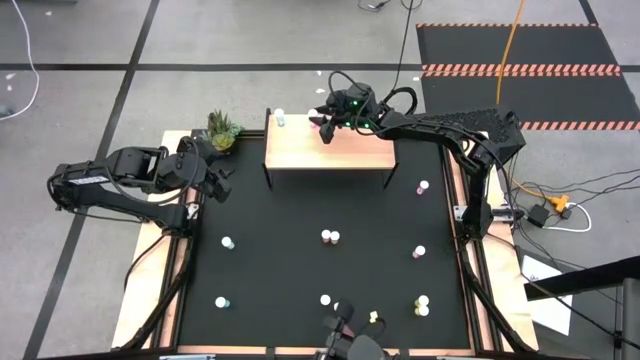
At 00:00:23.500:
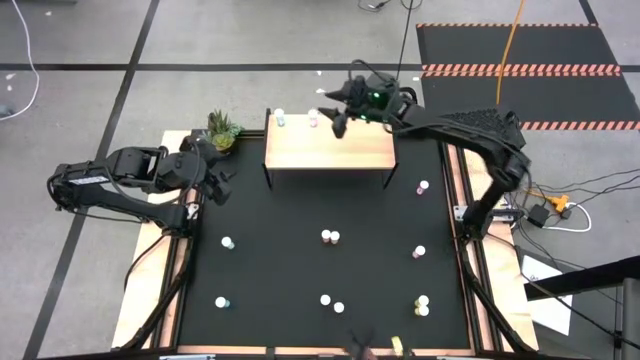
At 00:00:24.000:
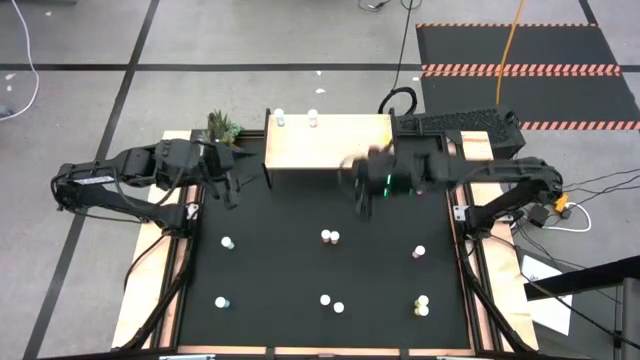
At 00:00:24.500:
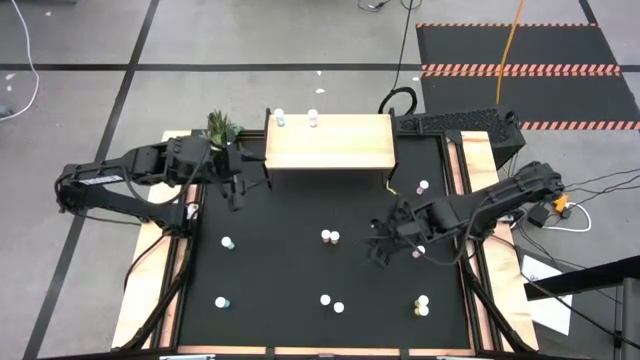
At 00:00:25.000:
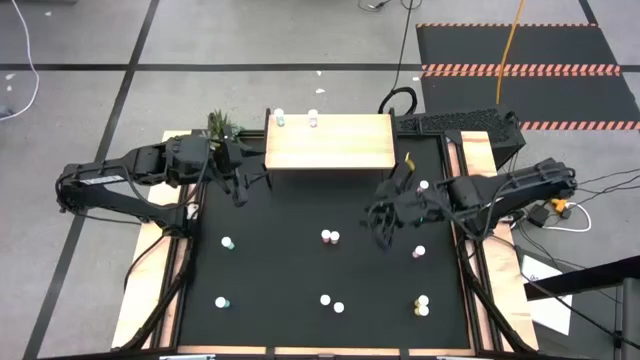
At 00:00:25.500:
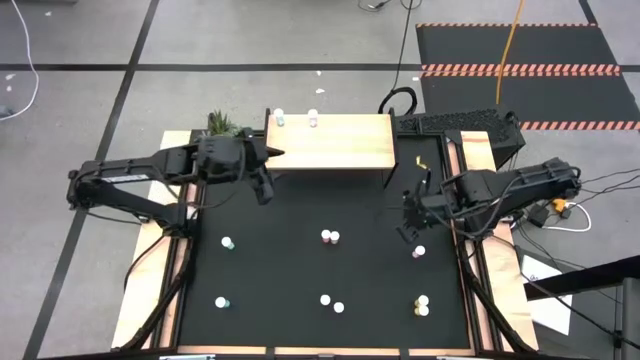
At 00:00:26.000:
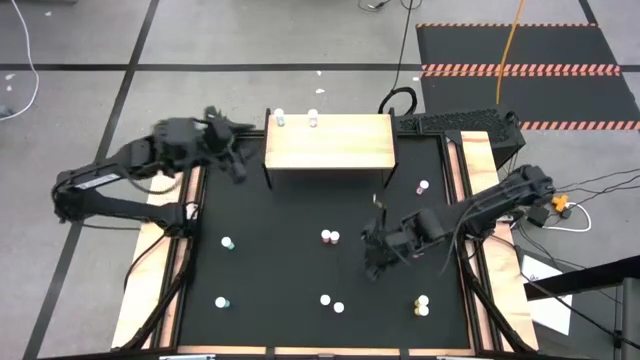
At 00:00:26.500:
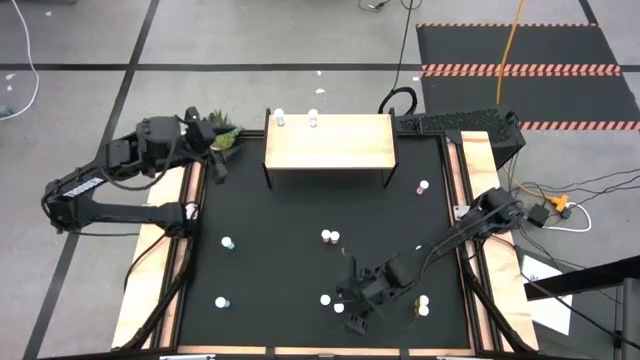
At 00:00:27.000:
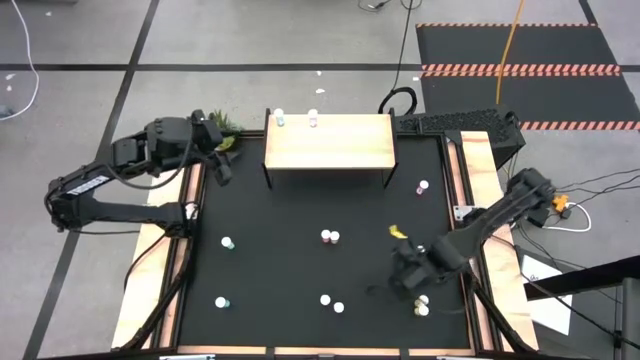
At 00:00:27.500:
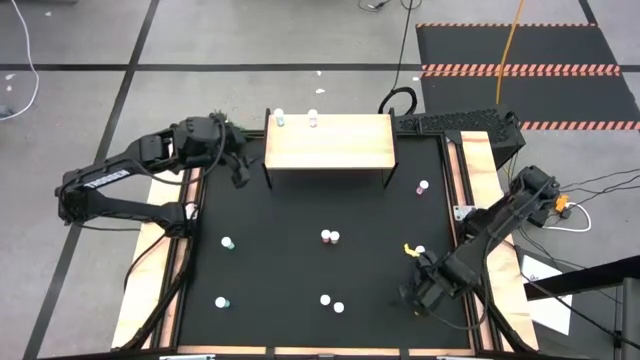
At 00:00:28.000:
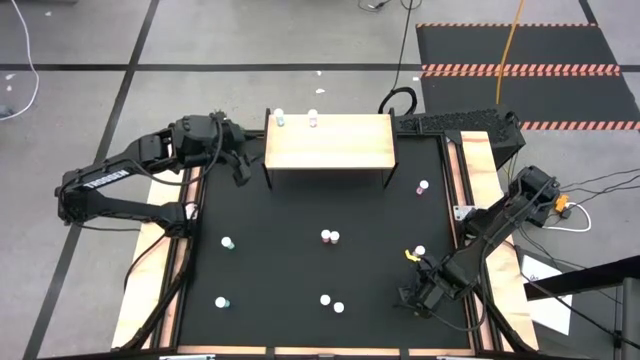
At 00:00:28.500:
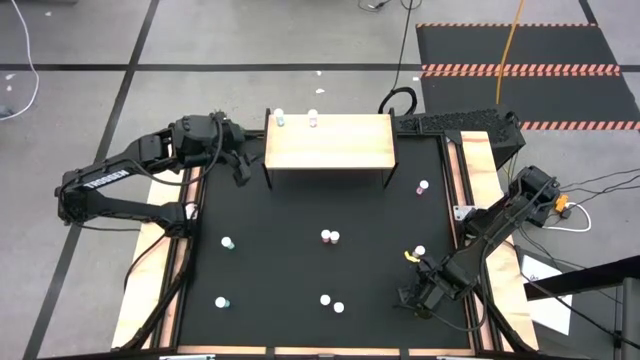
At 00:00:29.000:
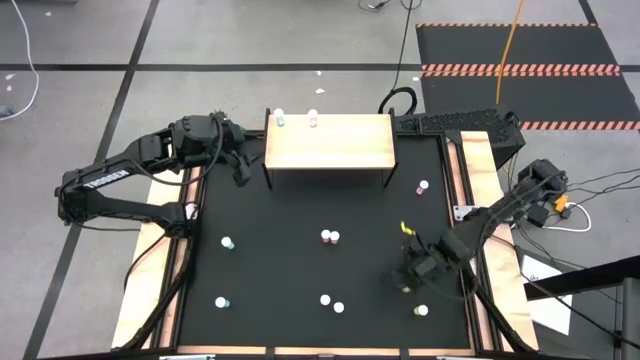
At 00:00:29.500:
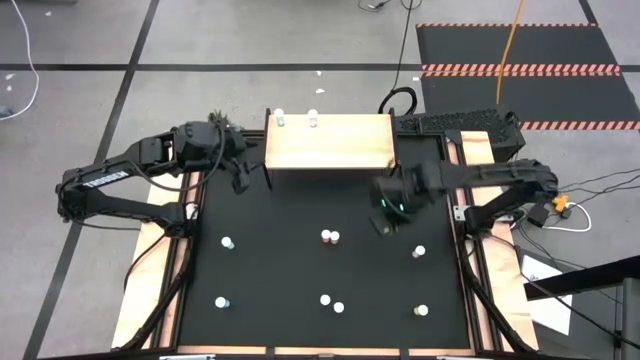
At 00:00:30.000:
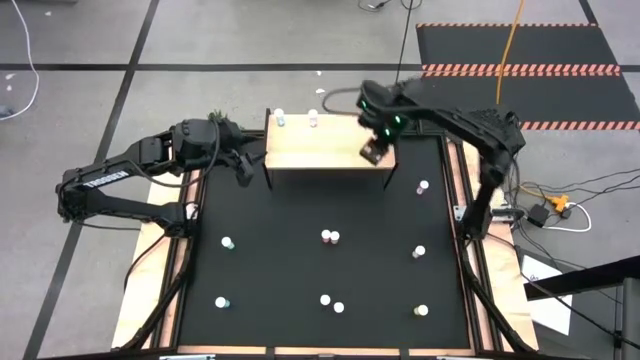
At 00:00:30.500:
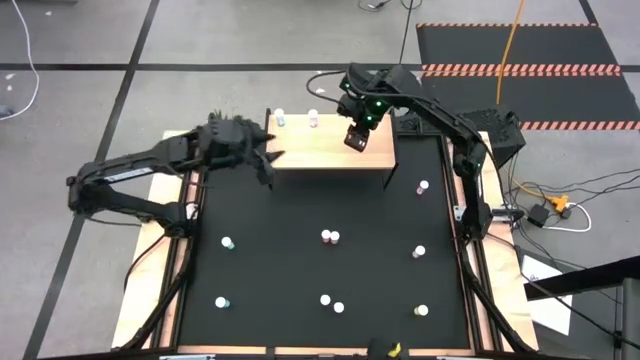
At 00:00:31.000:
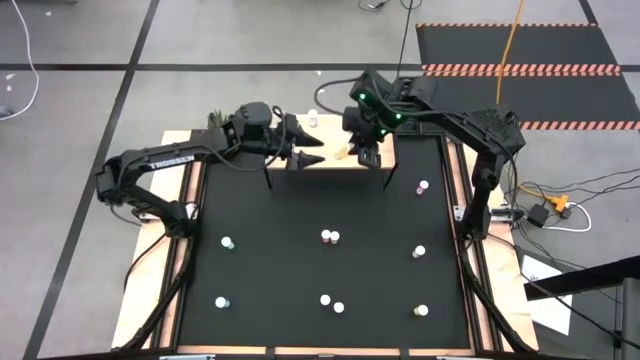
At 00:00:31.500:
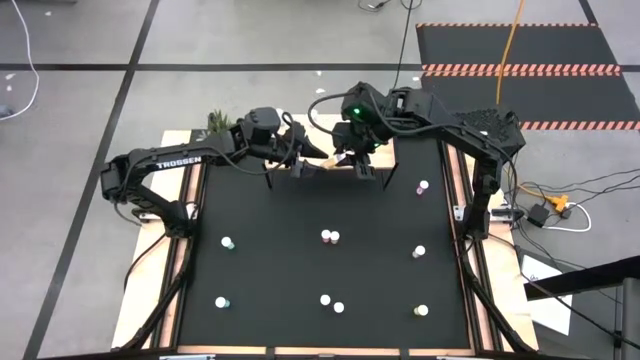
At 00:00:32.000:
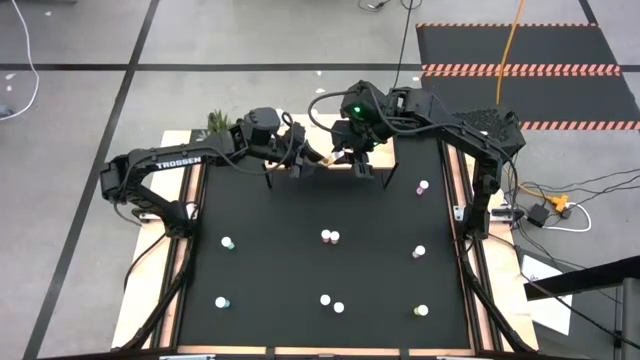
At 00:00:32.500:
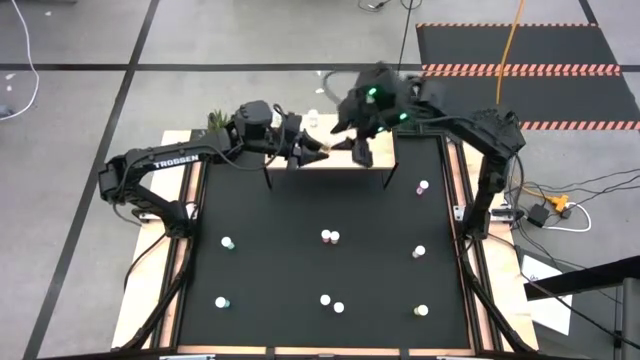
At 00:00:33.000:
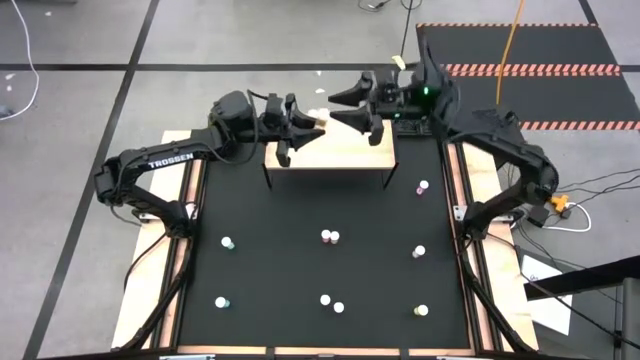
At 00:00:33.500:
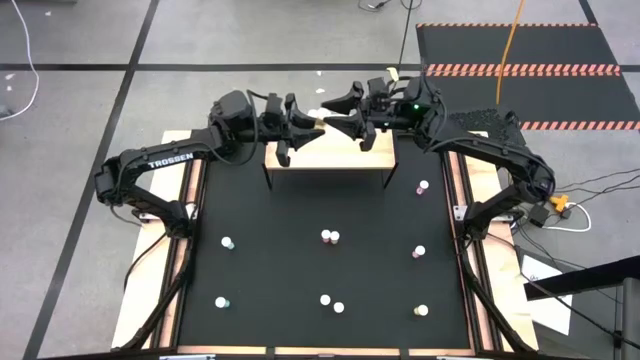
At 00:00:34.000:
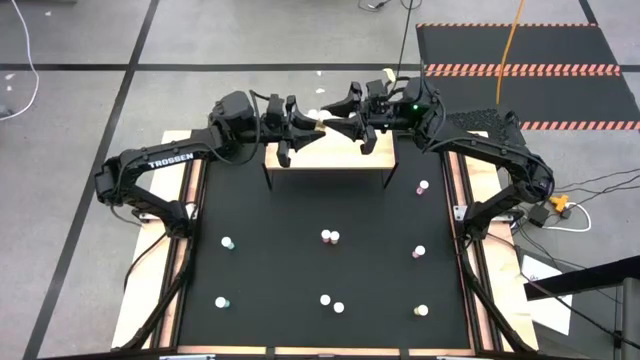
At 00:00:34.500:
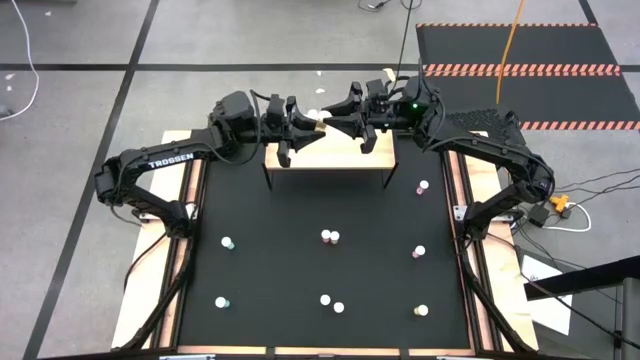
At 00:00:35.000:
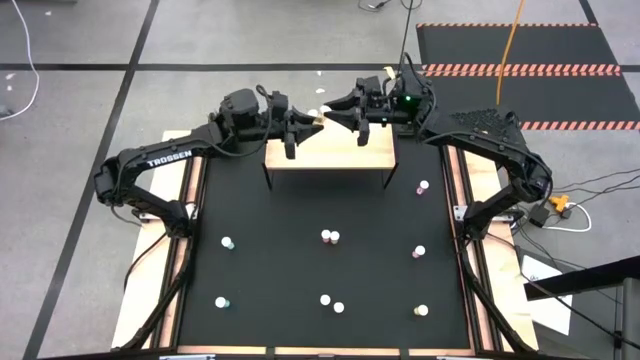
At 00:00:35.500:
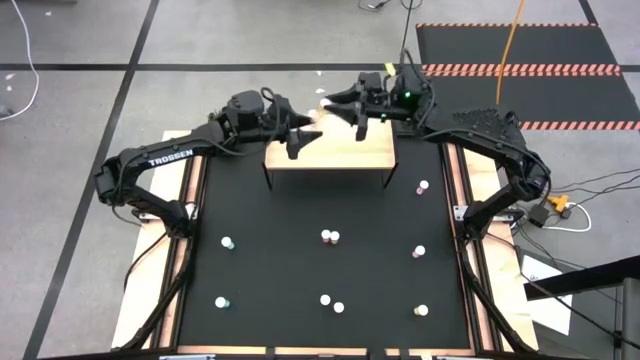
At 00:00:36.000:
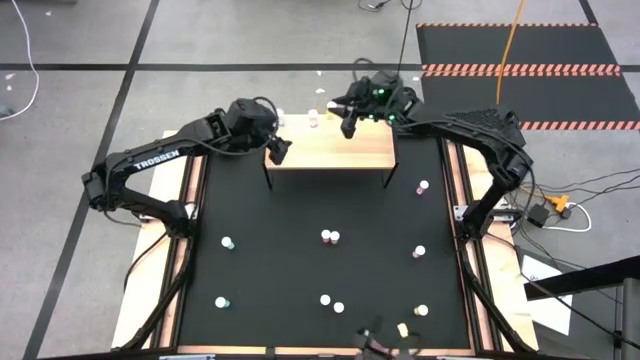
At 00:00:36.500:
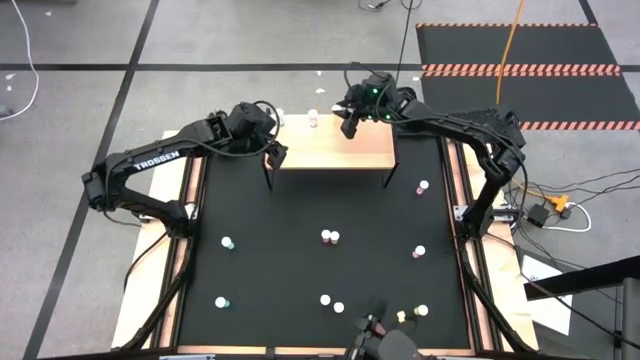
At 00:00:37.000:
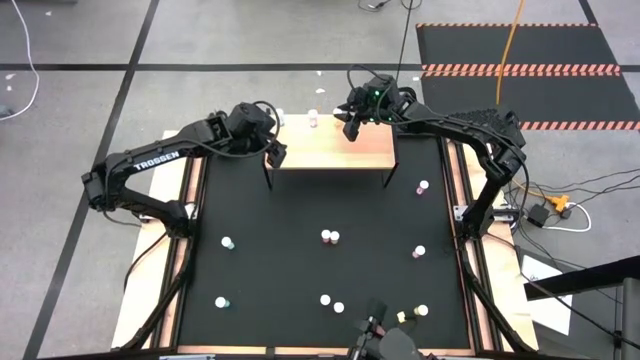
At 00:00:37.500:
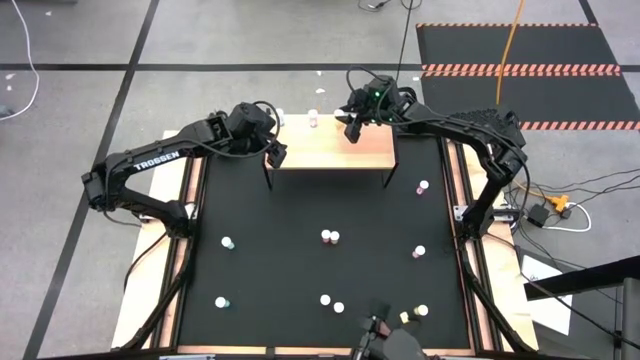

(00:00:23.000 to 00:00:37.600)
Task: Pick and place medicine bottles onto shelf by color
Put the middle yellow pill bottle on the shelf

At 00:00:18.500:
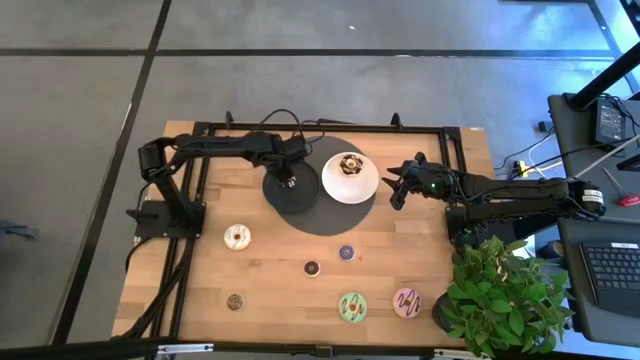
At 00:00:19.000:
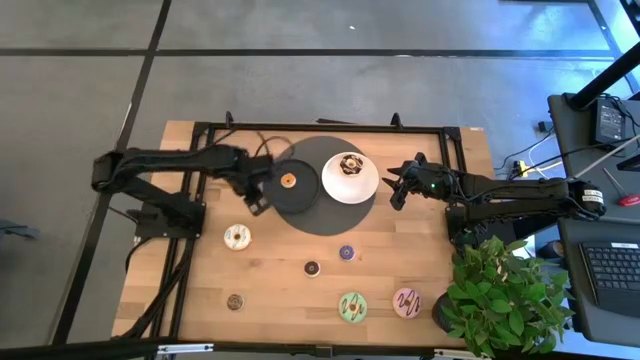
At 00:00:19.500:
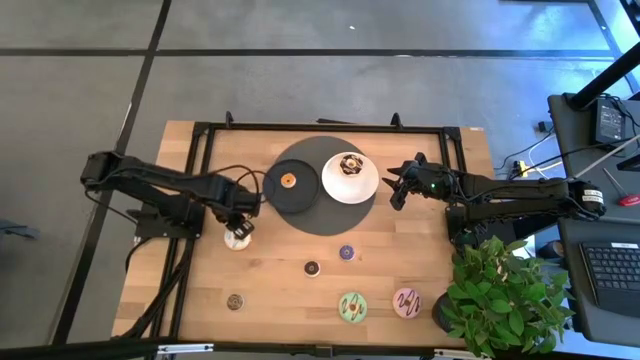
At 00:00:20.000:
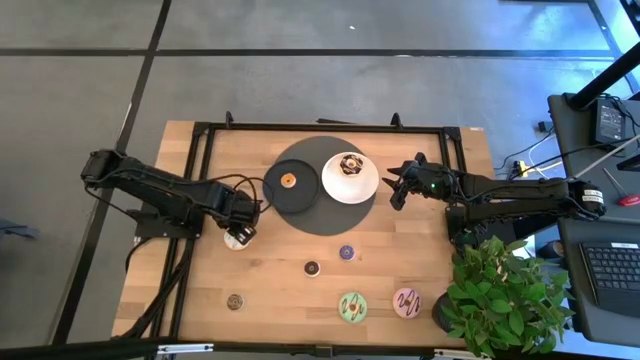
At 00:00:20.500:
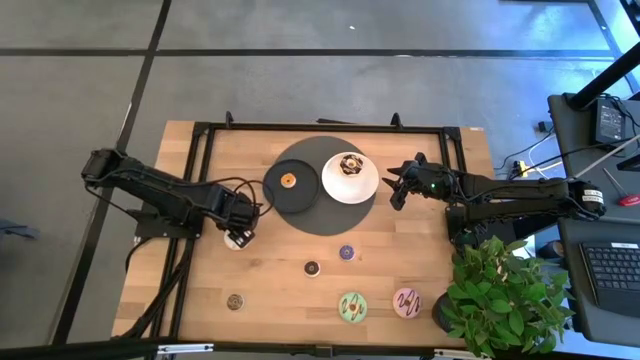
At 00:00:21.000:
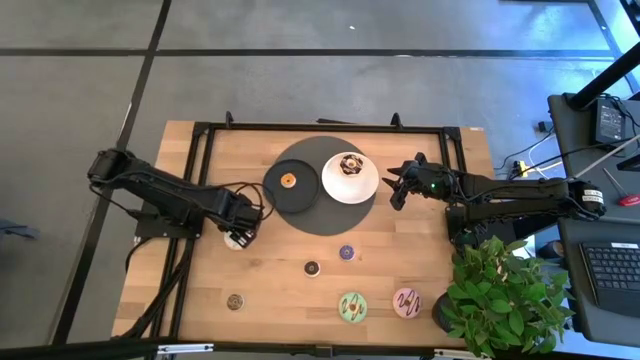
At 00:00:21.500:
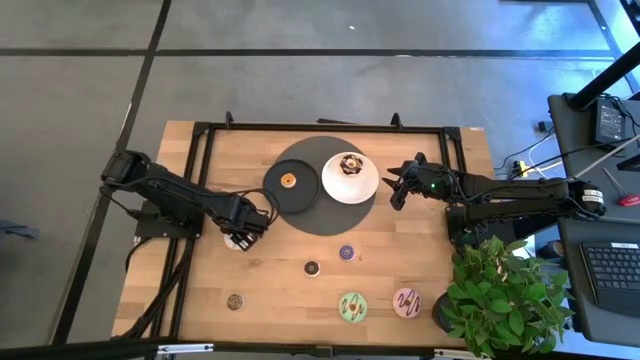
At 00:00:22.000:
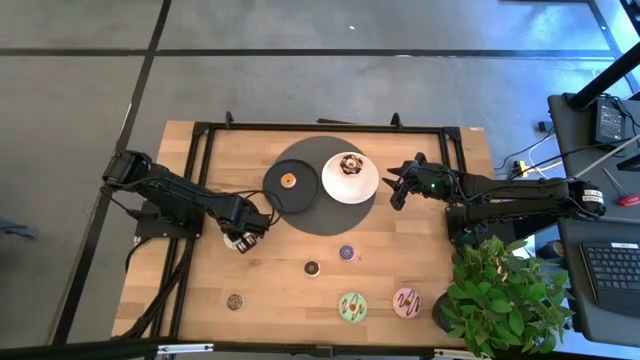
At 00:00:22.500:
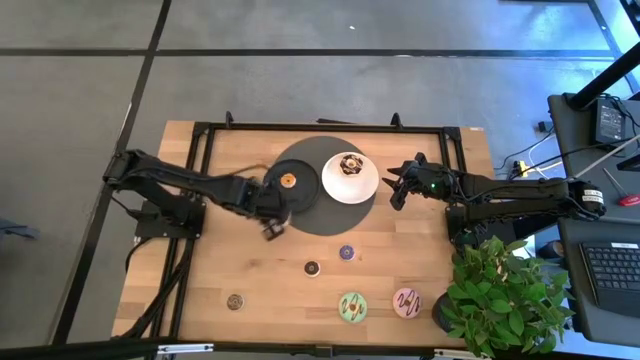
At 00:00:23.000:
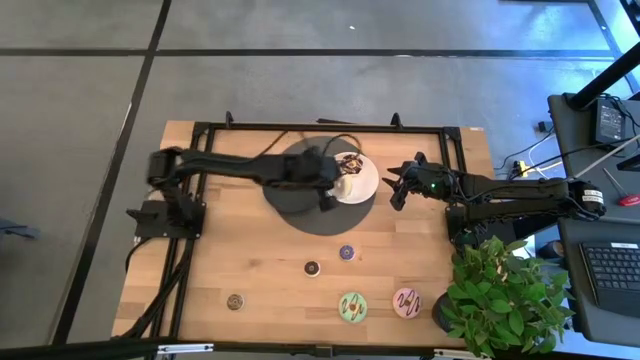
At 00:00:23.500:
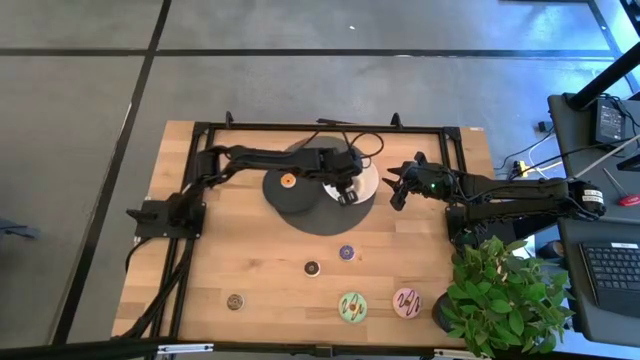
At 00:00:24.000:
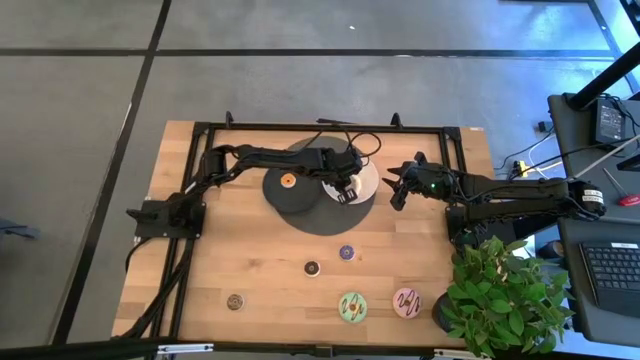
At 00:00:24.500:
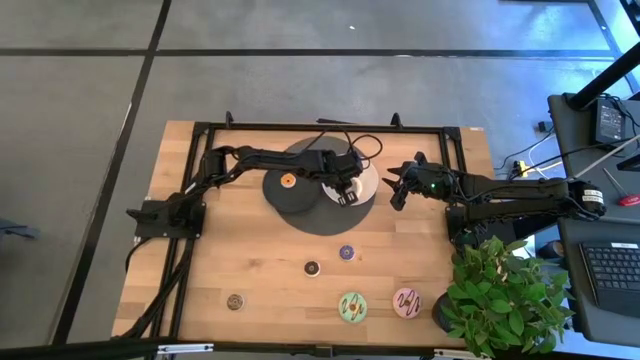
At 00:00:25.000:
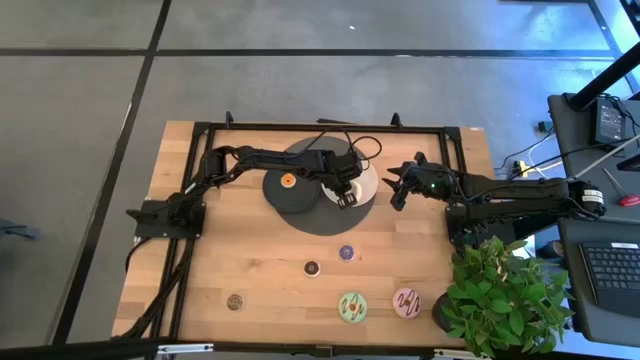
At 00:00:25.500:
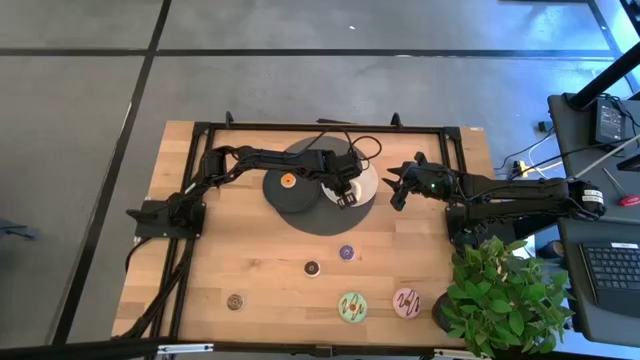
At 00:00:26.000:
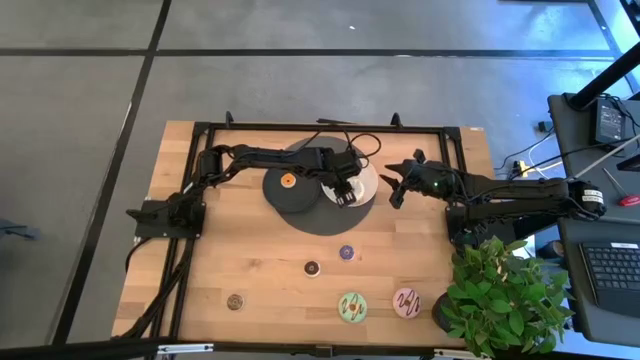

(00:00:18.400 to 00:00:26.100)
Task: Pick & Place donuts
Put the big white donut on the white plate
